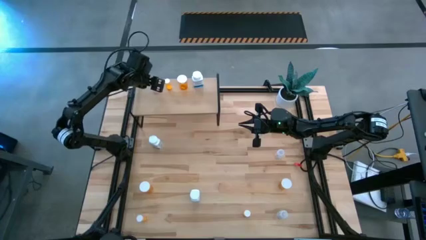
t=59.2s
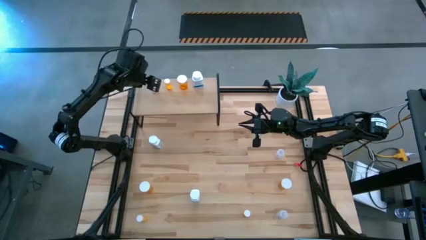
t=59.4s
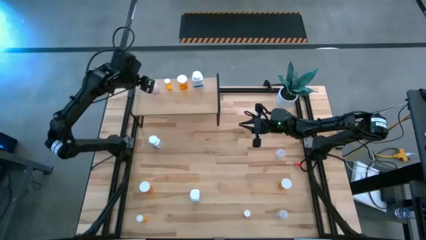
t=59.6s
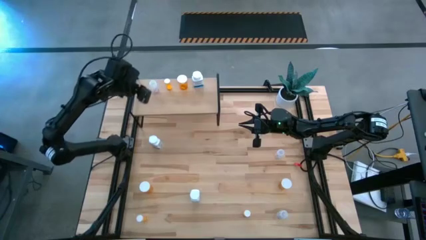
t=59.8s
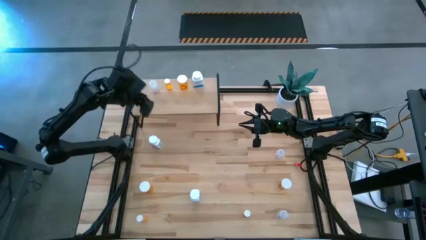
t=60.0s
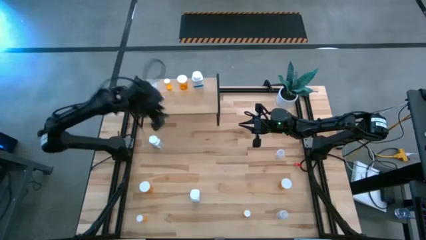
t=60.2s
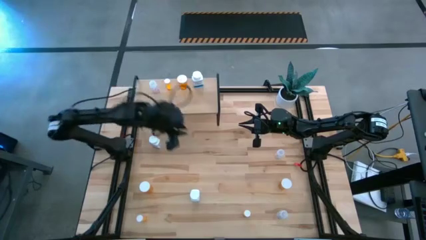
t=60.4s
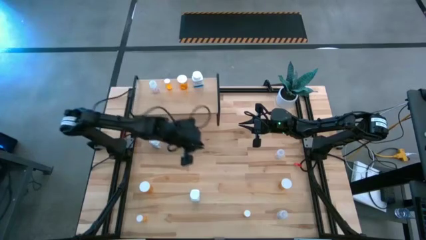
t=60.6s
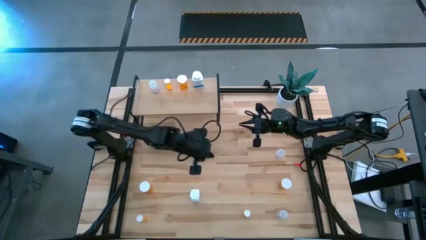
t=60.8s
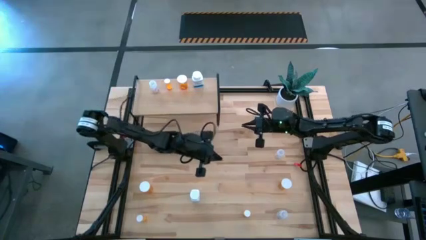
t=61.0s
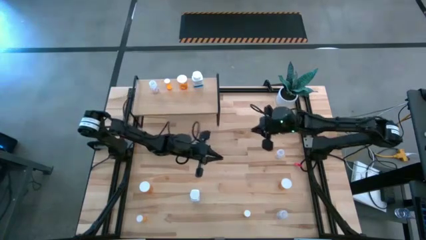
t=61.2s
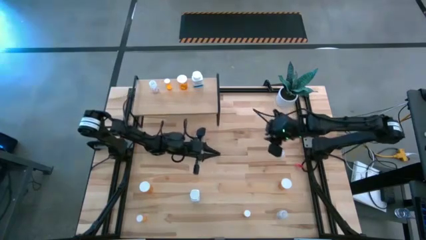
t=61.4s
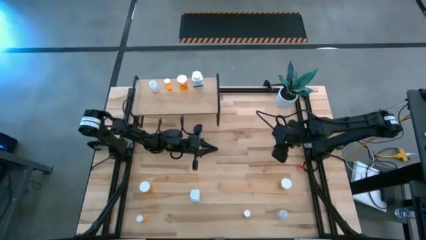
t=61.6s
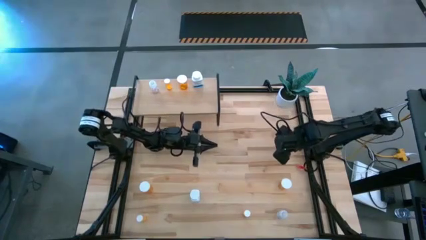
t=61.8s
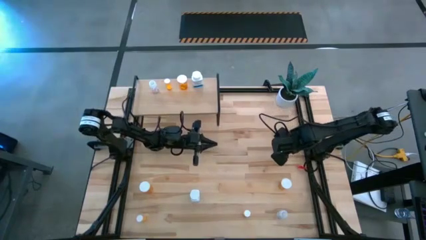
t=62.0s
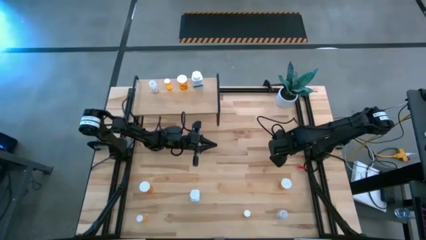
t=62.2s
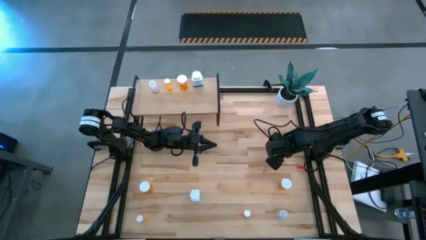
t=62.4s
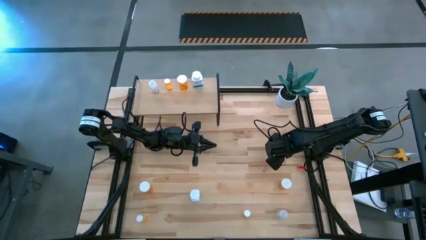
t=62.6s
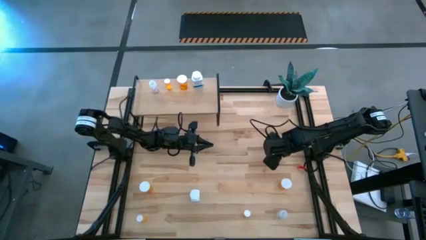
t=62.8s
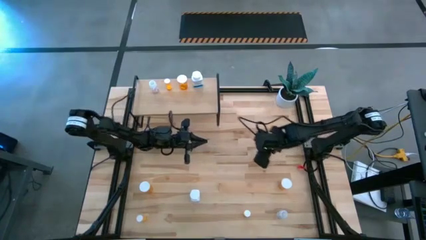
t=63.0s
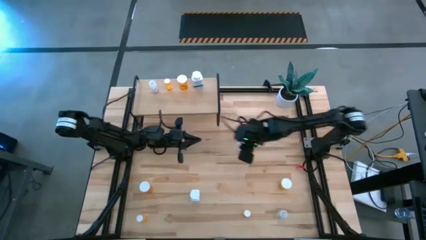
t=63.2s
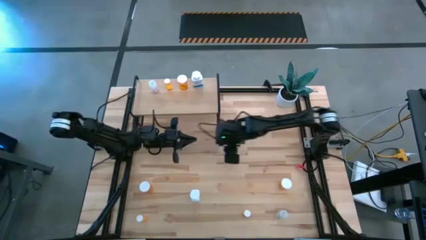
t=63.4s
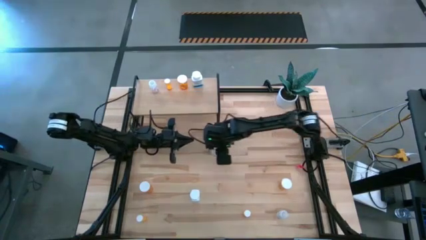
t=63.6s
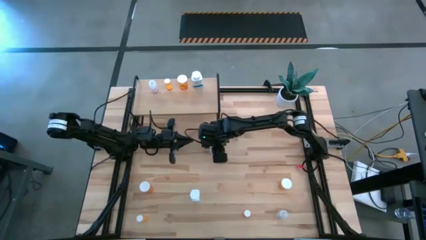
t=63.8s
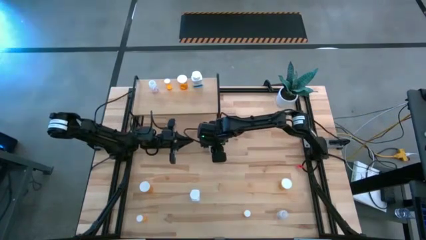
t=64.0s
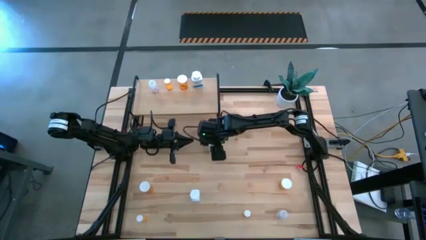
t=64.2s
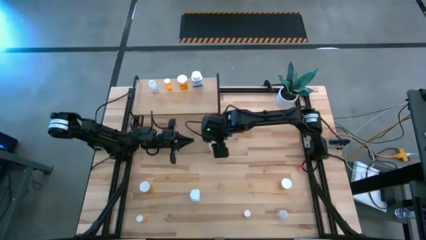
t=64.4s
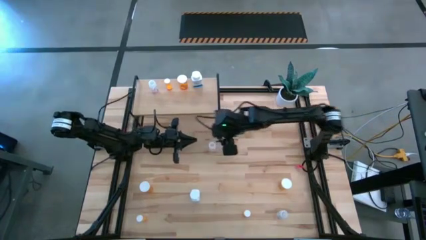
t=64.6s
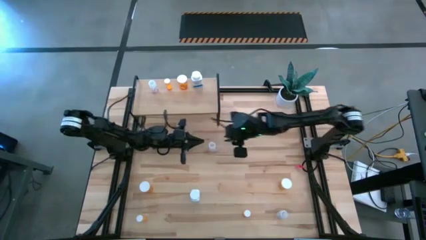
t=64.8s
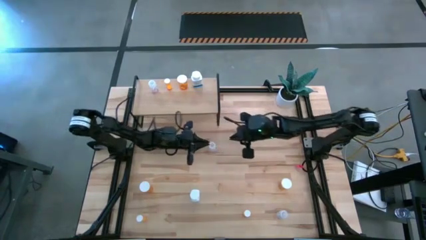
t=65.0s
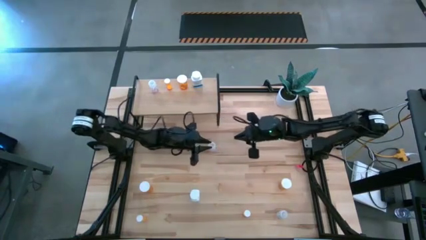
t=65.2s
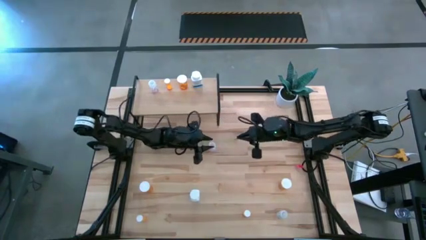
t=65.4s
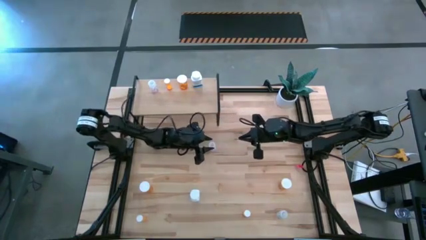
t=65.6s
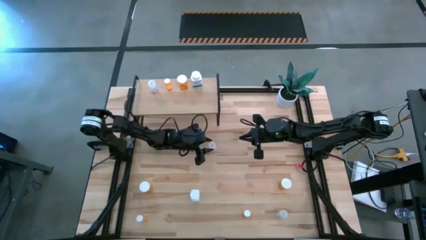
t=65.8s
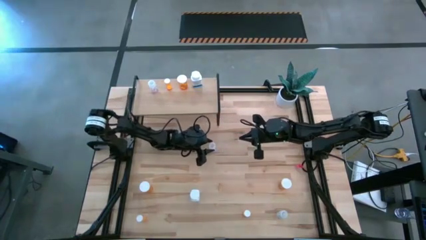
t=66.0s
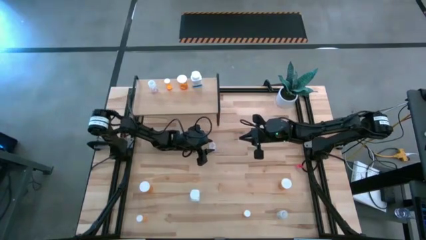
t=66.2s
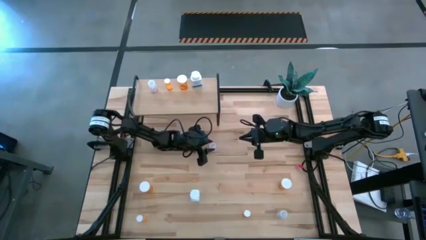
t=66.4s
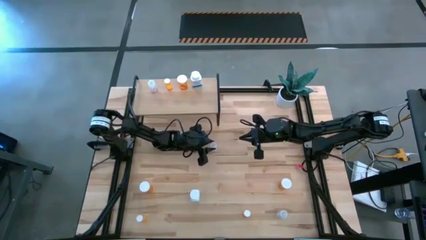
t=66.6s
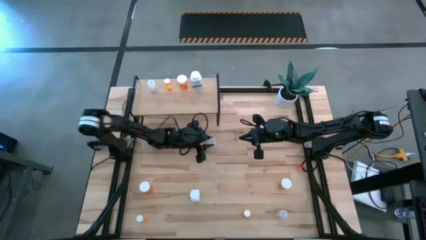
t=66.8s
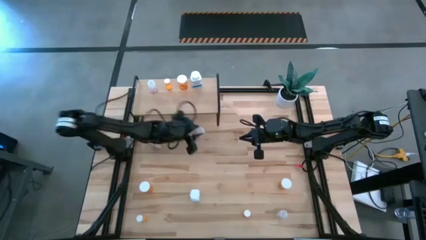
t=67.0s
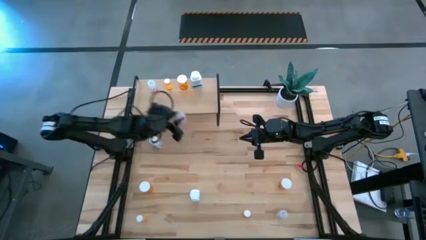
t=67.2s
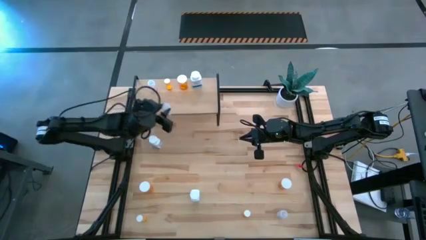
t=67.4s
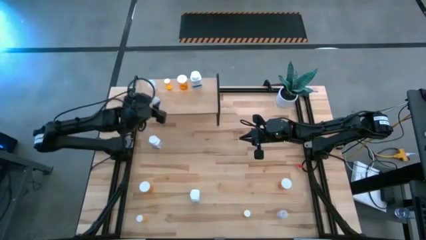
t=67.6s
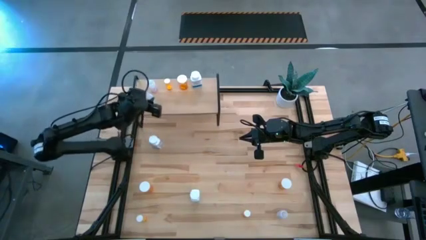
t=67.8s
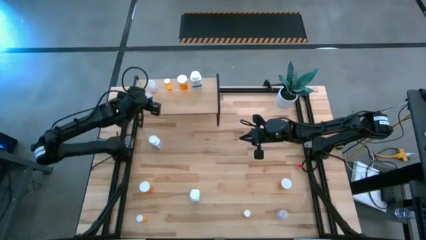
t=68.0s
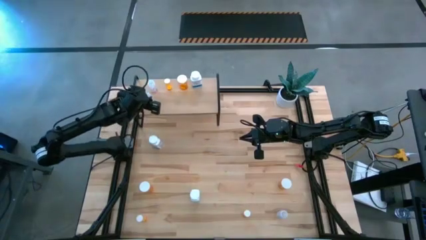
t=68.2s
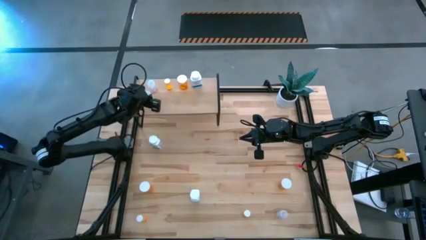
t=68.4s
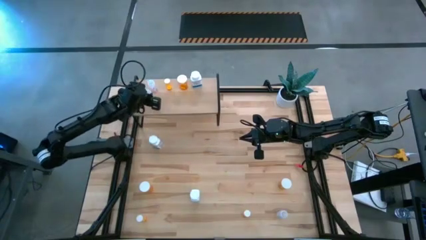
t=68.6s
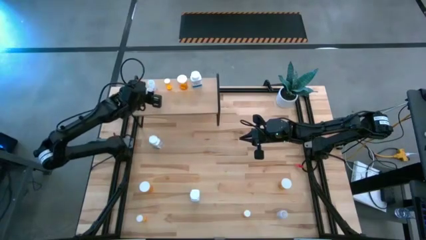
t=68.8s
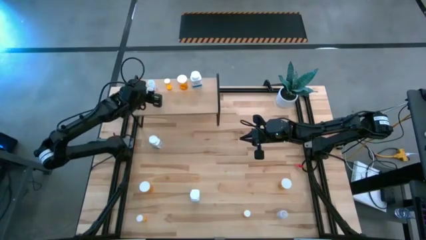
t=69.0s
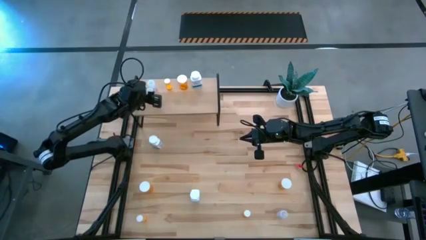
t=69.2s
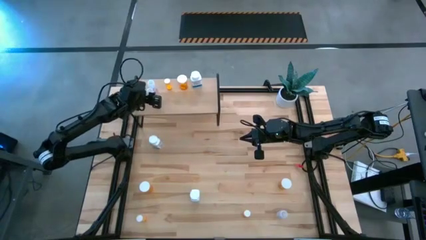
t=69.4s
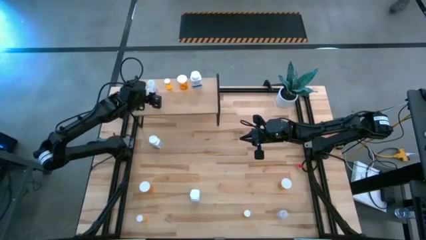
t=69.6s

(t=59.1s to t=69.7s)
Task: Pick and place medicine bottles onto shelf by color
Put the top transparent pill bottle aligned with the other transparent pill bottle on the shelf

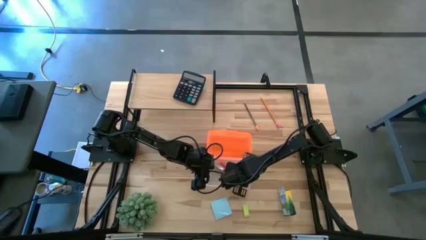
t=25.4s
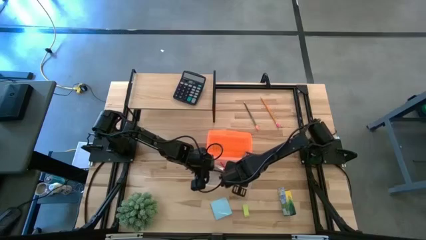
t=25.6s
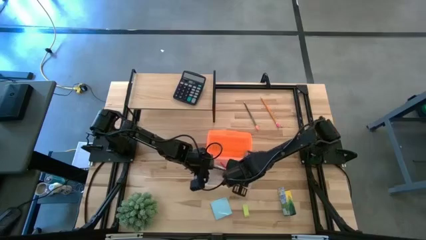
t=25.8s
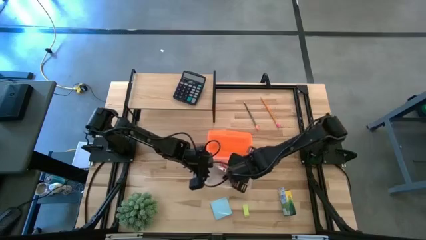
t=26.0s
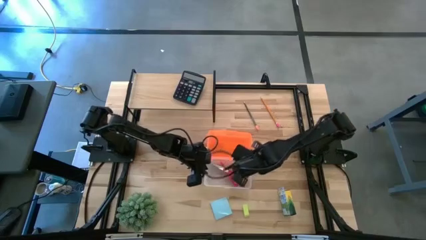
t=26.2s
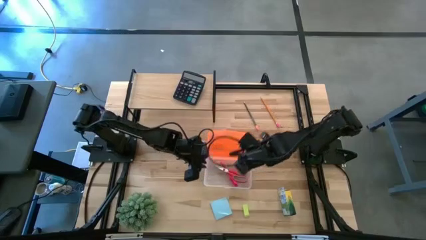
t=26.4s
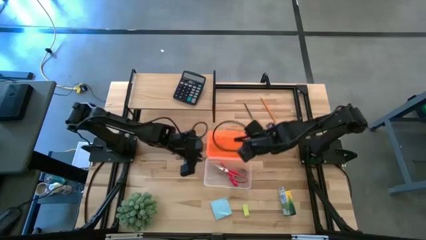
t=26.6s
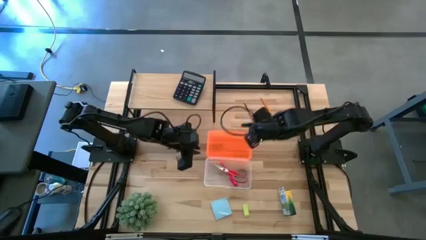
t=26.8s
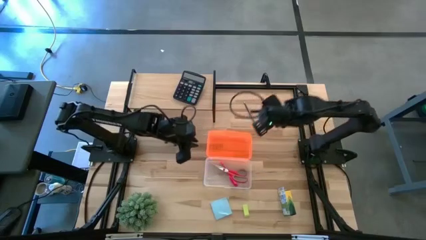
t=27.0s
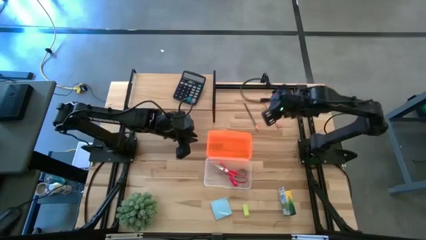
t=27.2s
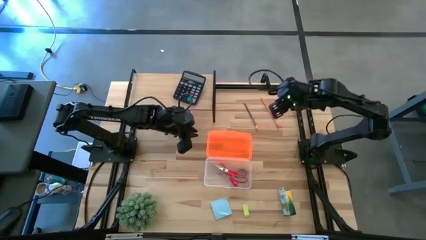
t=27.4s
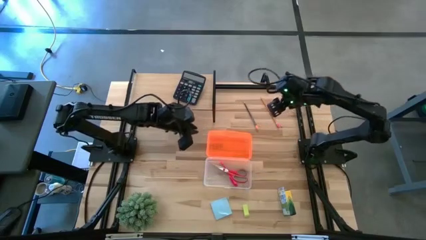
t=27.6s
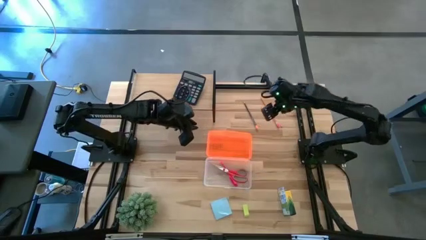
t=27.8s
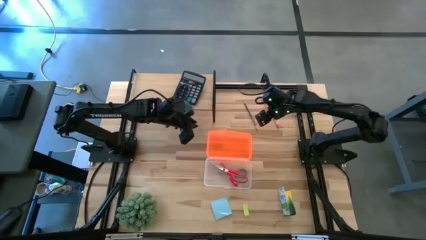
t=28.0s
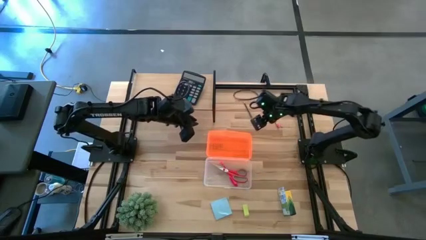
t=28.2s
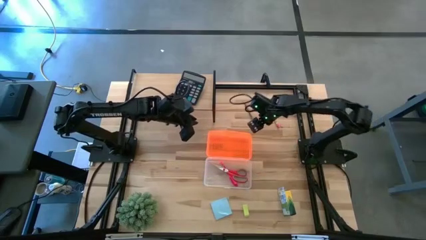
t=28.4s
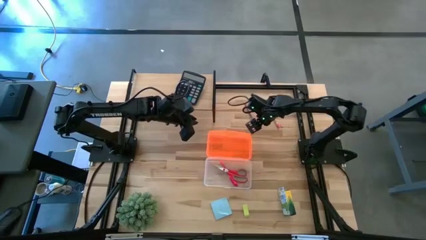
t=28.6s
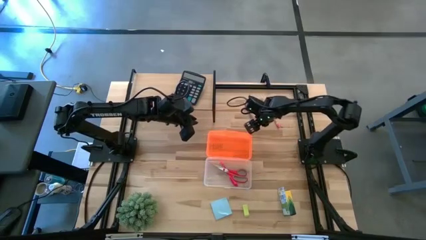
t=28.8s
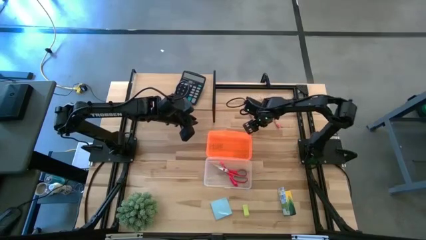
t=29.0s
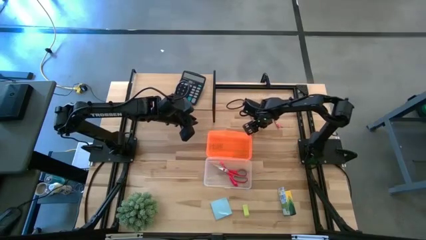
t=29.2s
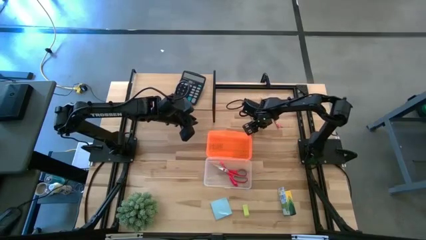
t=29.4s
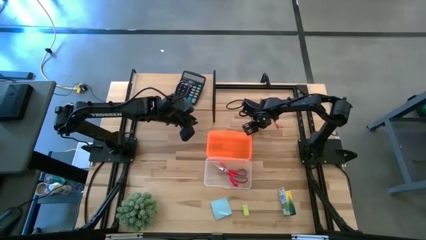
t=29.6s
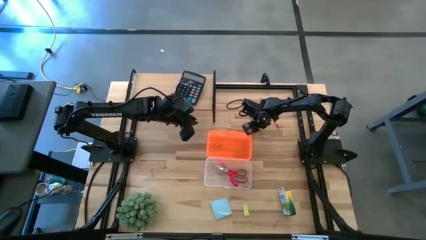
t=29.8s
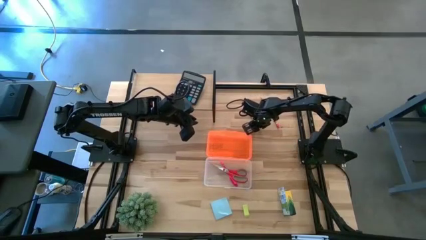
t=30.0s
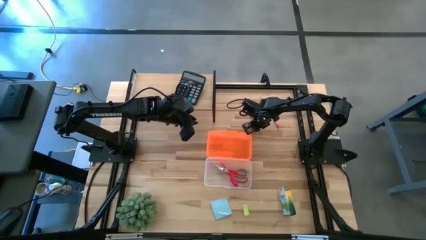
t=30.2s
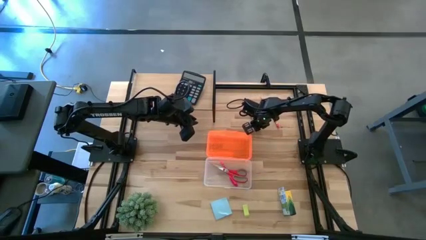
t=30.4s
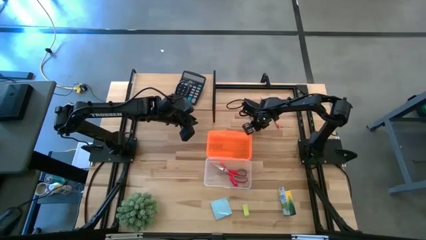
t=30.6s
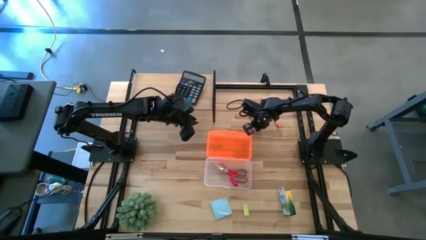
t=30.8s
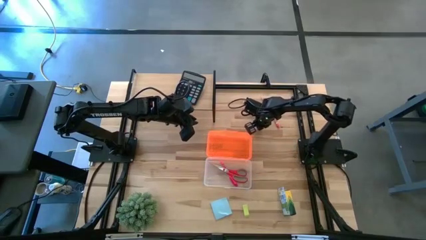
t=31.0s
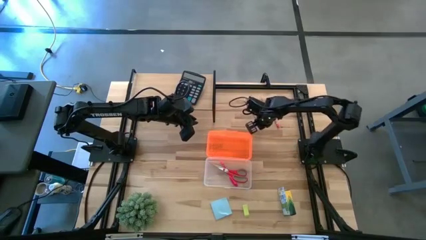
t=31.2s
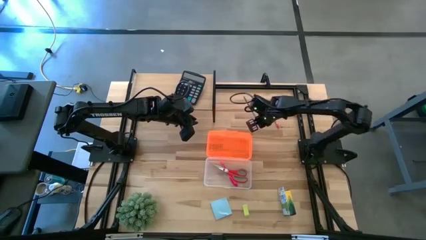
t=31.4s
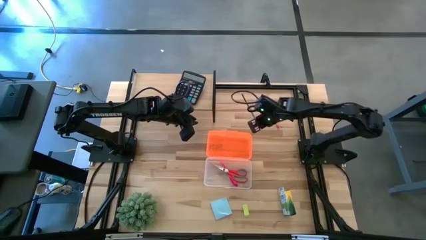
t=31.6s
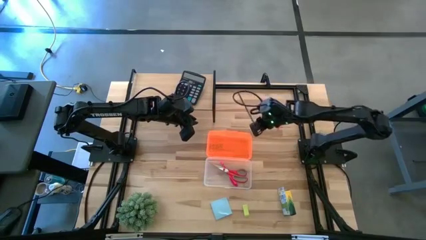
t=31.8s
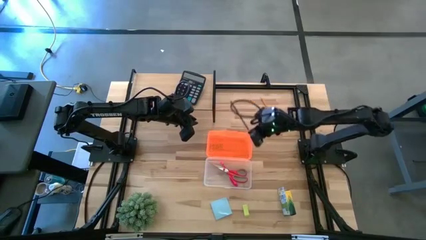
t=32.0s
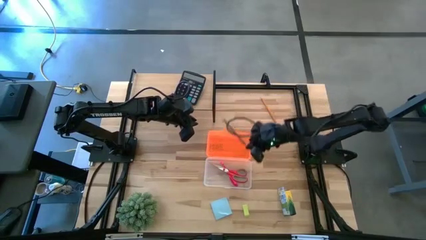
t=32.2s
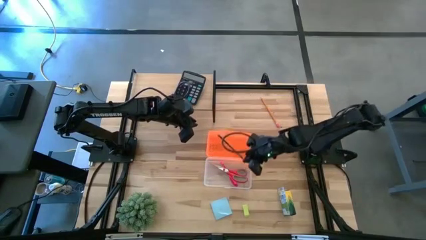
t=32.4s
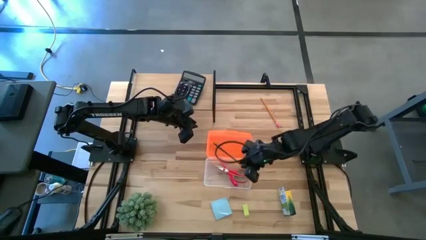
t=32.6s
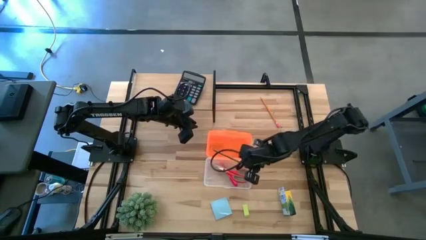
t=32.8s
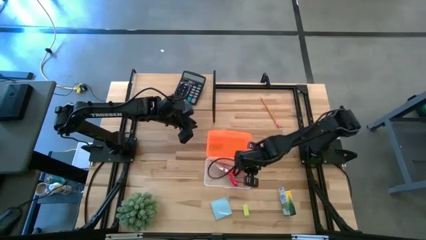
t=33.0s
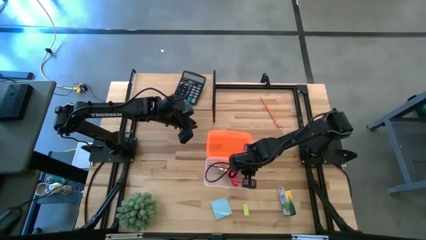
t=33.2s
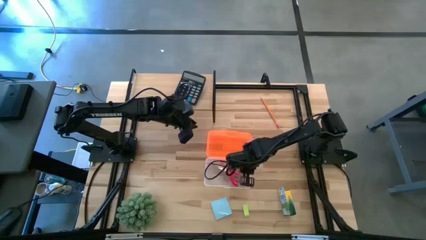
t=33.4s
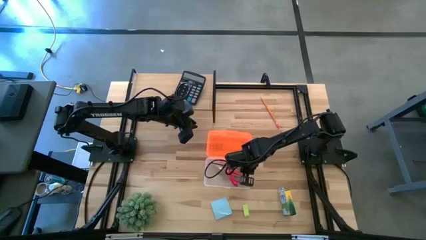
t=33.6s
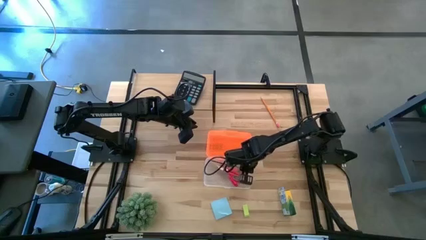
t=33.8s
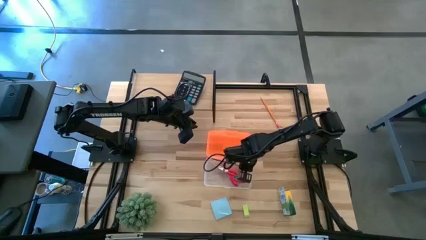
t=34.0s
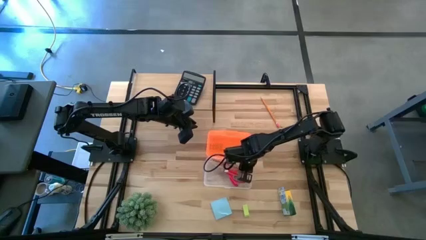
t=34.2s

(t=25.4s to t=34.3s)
Task: Pack school essentials
Put the black pencil into the supply box
